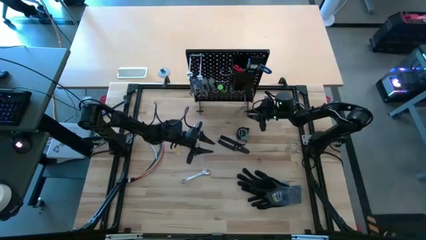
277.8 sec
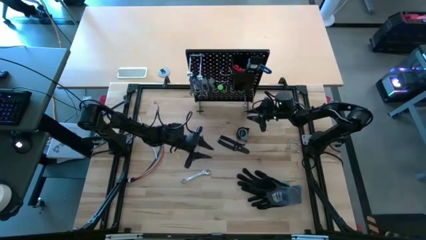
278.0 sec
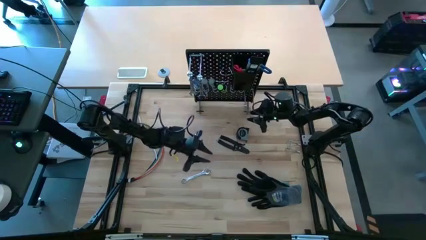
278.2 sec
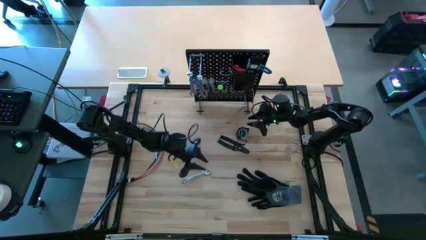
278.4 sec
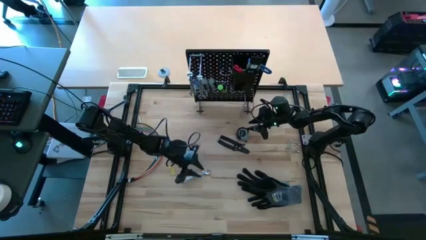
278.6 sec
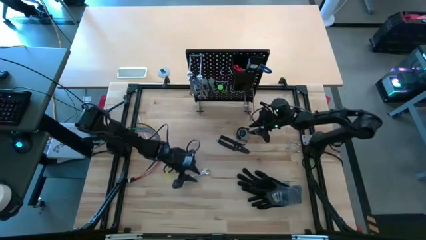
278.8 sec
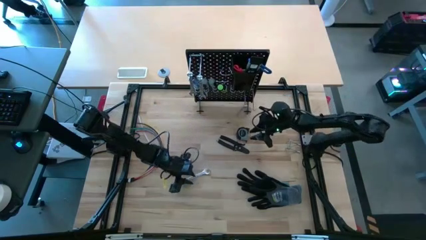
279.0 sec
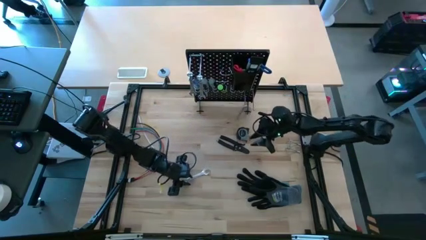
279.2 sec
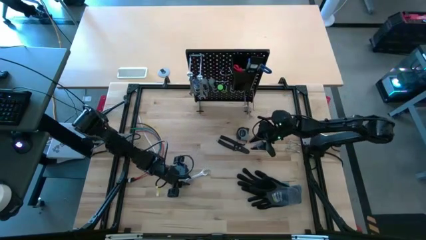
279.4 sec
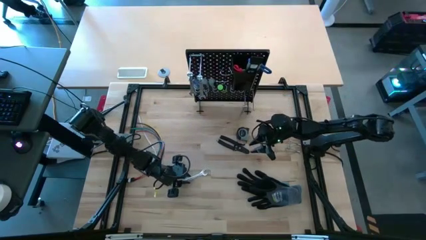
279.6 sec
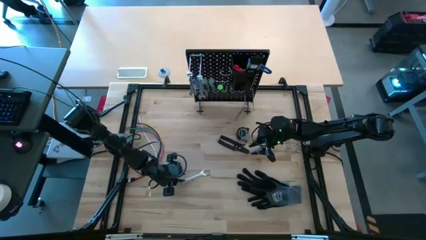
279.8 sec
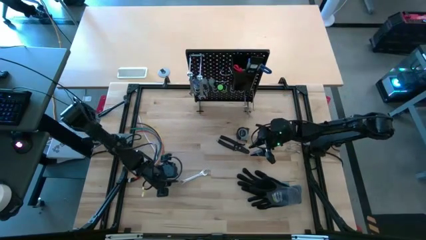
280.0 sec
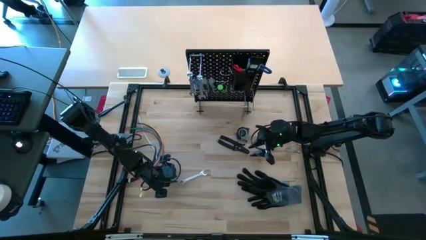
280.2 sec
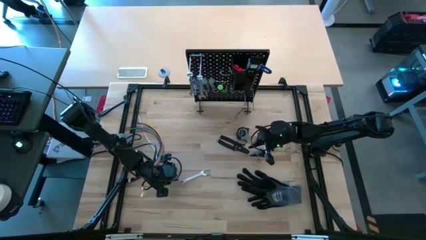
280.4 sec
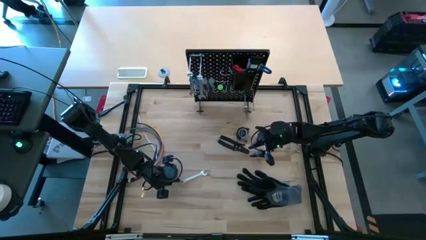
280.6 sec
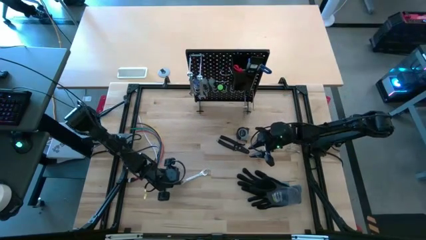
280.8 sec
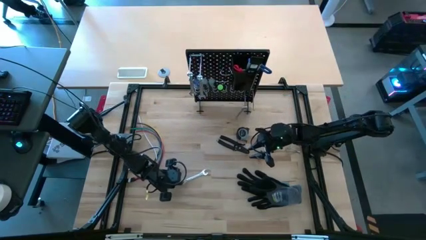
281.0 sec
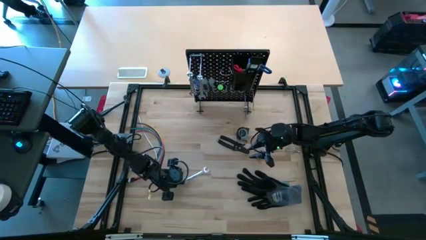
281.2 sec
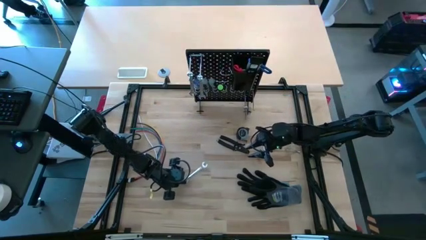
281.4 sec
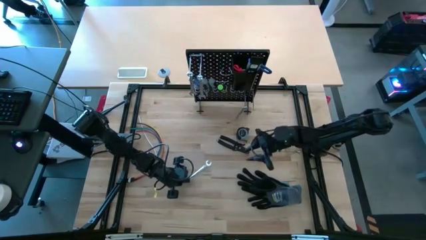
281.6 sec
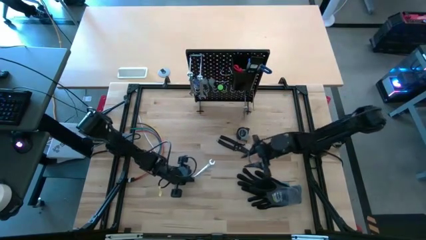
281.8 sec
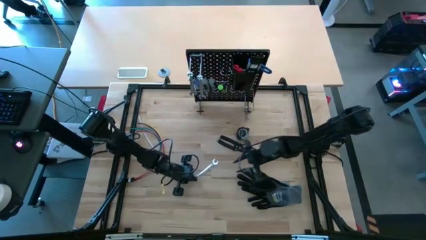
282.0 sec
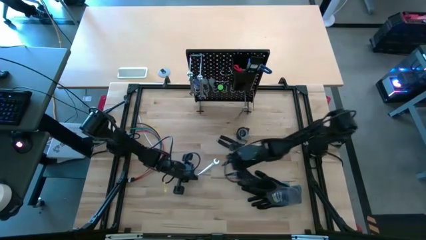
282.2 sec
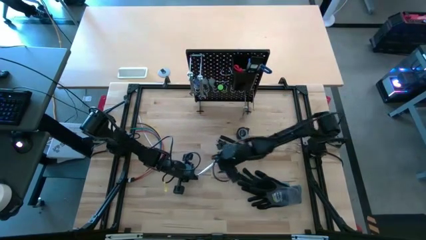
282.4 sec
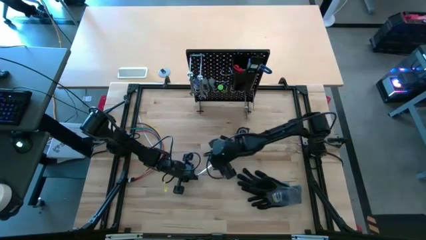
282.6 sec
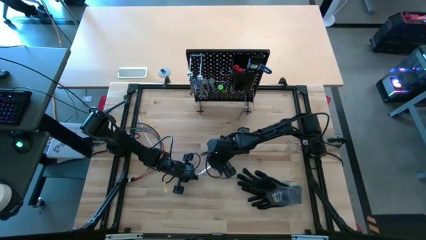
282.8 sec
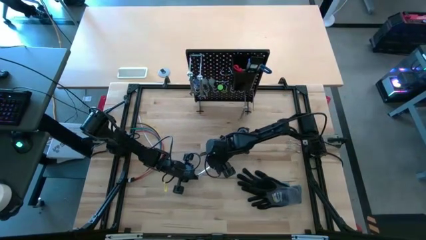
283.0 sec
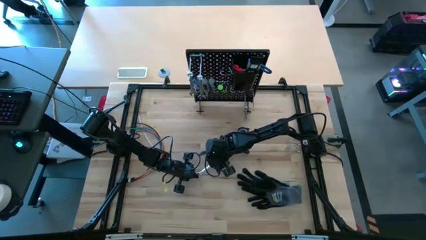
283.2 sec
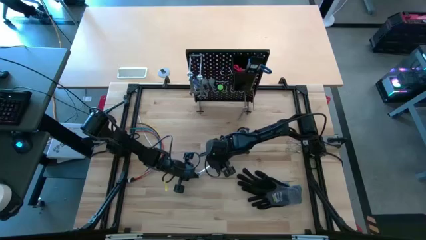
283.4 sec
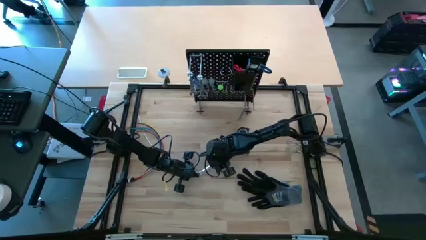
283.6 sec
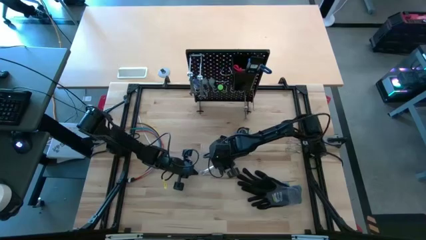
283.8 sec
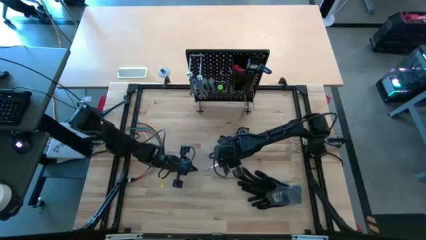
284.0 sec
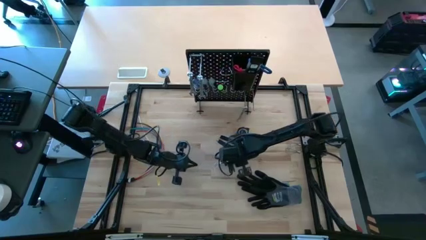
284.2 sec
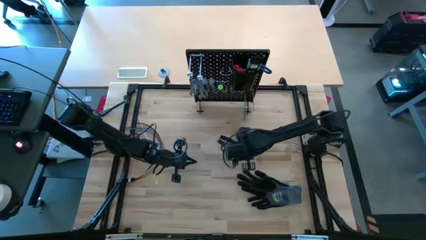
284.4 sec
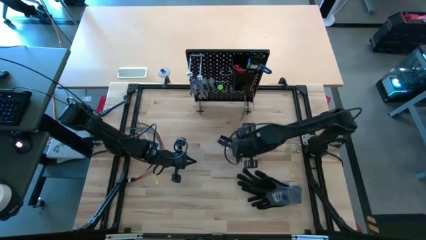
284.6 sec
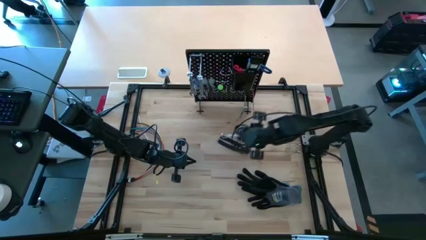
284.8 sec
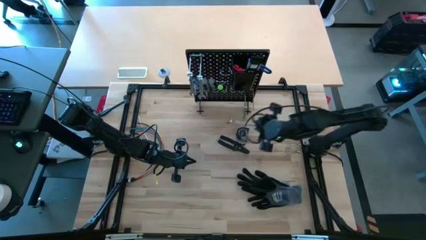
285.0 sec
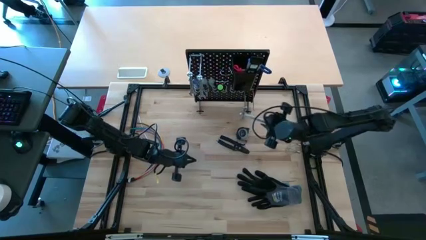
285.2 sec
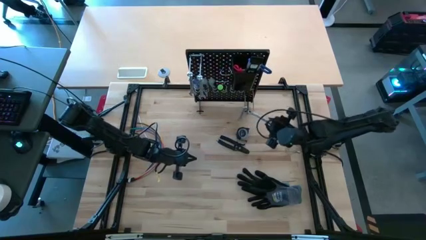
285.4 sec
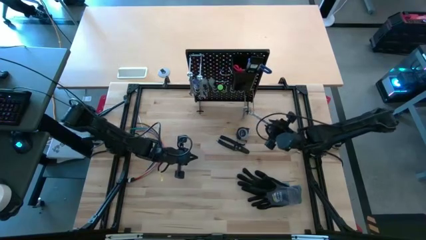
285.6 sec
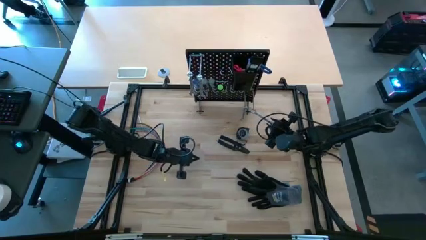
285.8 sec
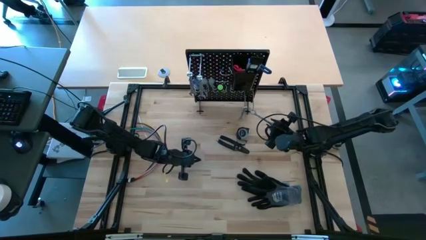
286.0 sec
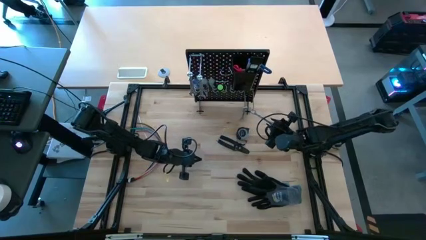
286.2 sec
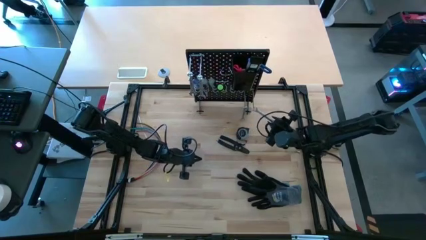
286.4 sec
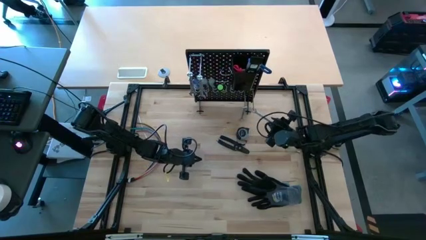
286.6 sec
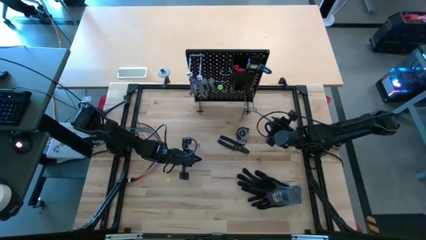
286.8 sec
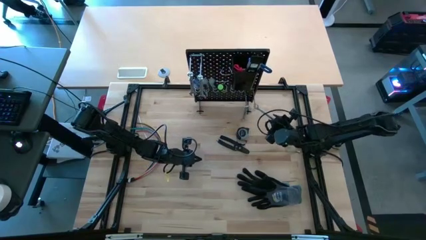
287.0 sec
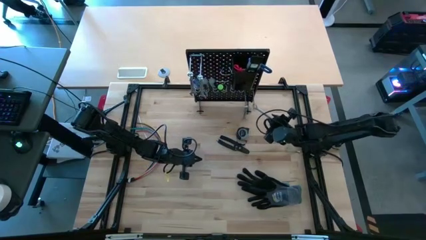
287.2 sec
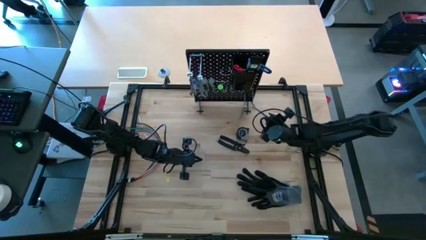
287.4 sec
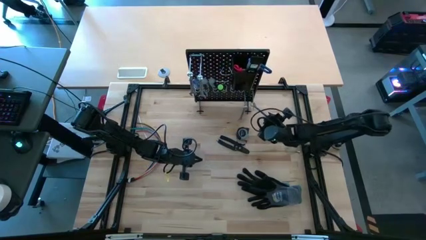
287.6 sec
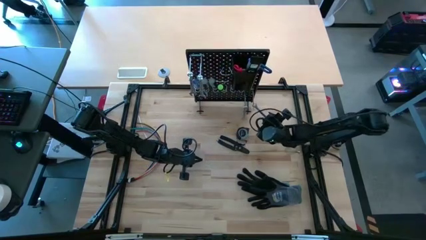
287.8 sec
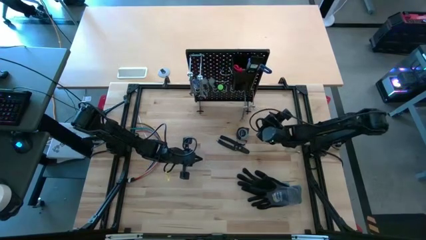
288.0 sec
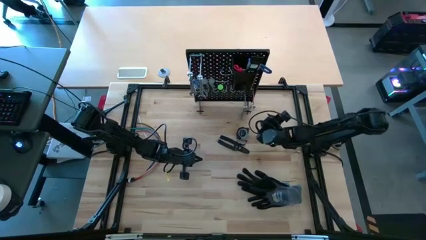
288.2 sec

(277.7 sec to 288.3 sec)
Task: Hang tools onto peg board
Hang the wrench on the peg board
